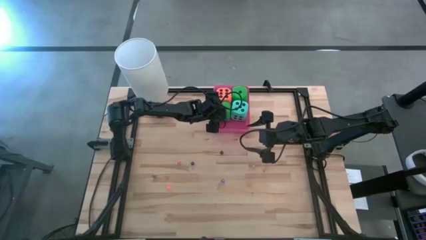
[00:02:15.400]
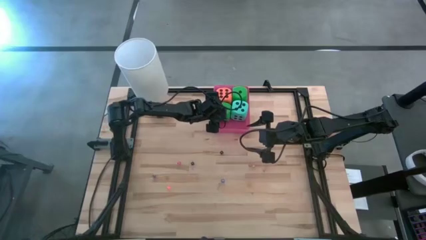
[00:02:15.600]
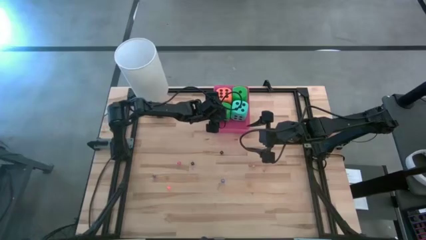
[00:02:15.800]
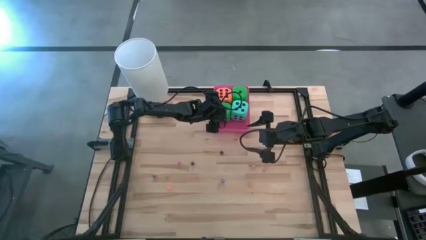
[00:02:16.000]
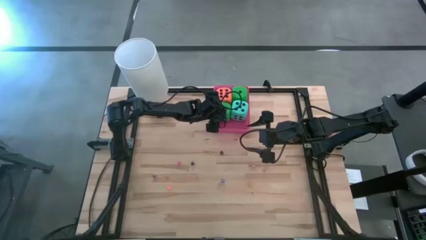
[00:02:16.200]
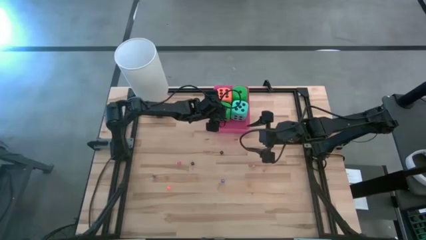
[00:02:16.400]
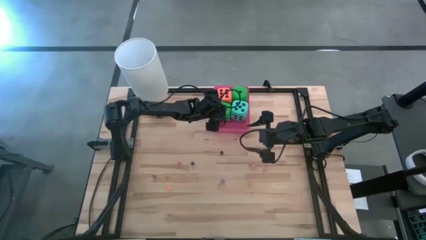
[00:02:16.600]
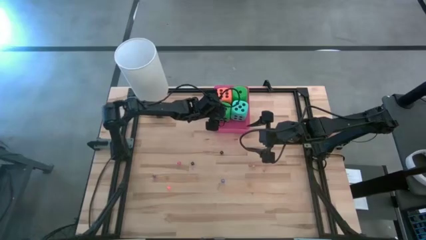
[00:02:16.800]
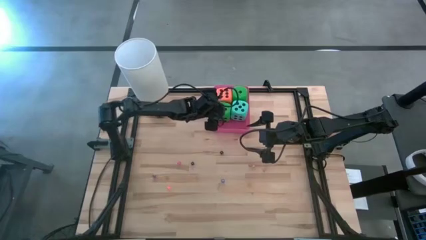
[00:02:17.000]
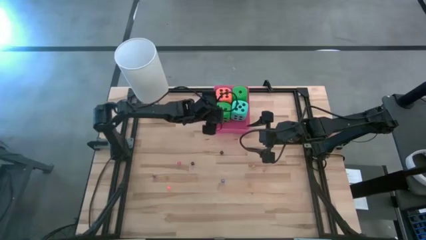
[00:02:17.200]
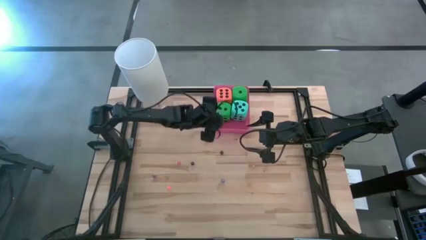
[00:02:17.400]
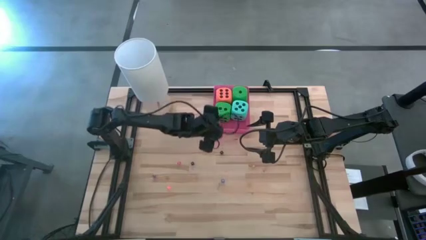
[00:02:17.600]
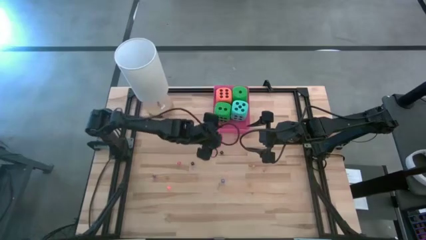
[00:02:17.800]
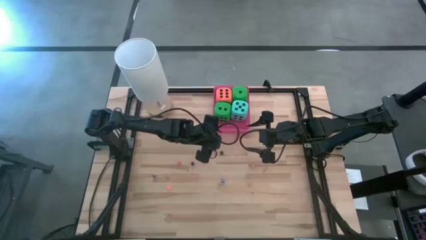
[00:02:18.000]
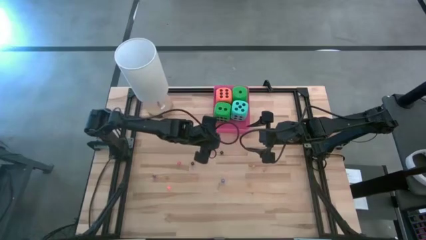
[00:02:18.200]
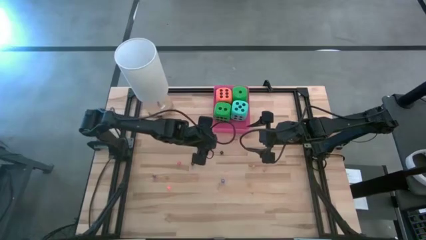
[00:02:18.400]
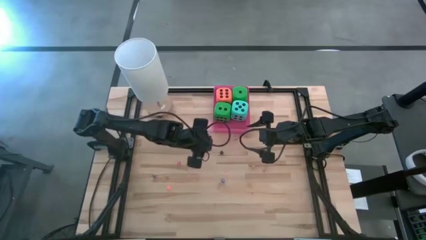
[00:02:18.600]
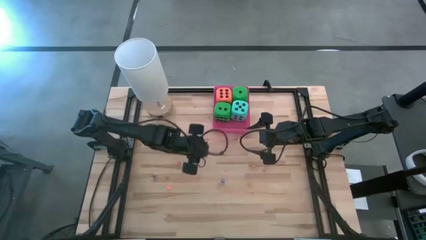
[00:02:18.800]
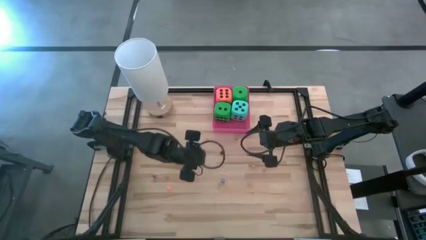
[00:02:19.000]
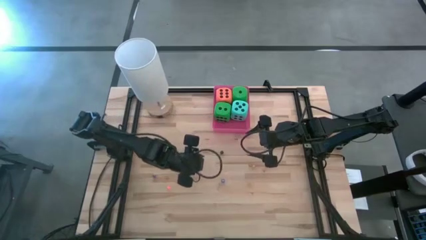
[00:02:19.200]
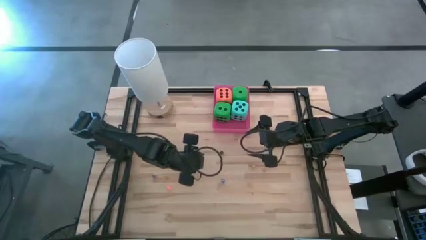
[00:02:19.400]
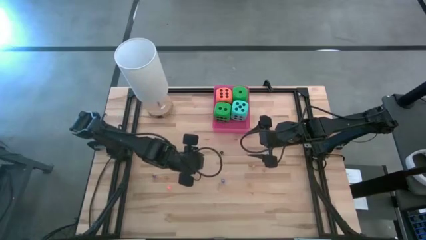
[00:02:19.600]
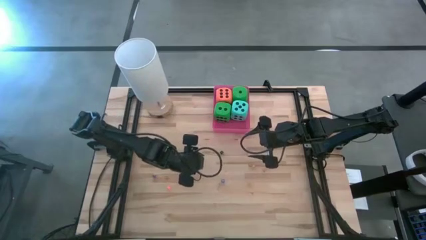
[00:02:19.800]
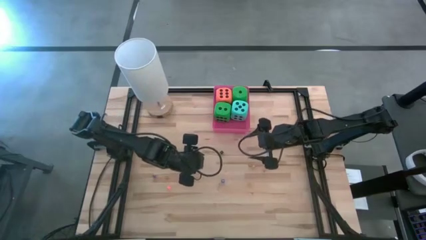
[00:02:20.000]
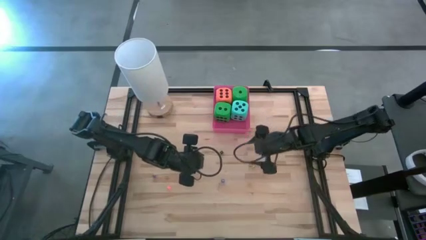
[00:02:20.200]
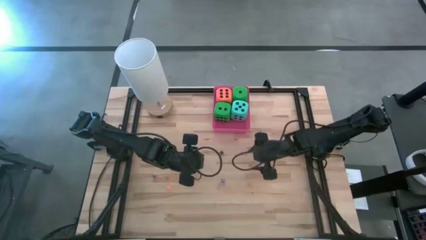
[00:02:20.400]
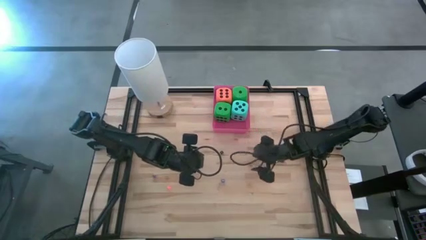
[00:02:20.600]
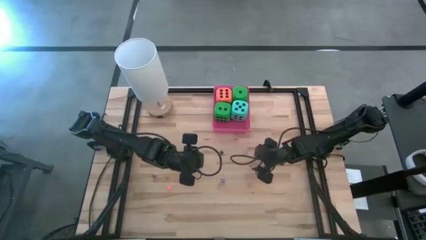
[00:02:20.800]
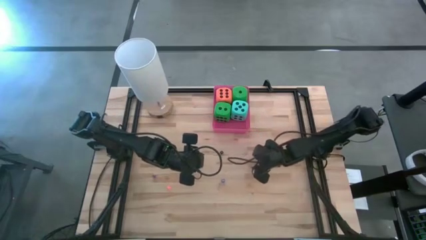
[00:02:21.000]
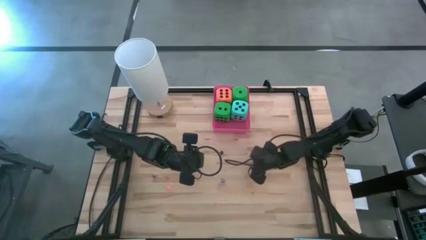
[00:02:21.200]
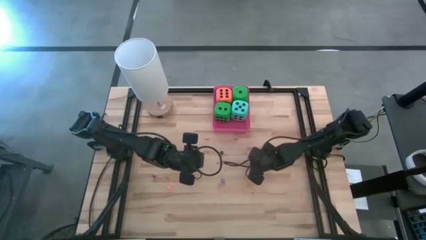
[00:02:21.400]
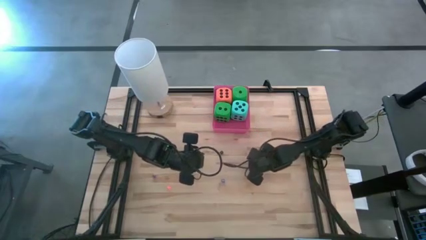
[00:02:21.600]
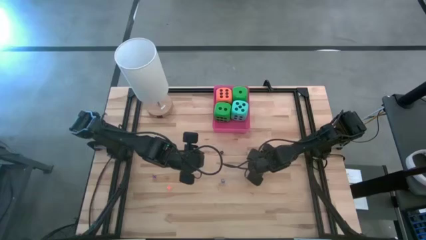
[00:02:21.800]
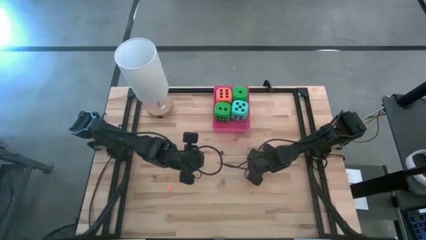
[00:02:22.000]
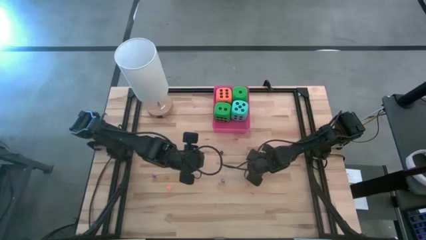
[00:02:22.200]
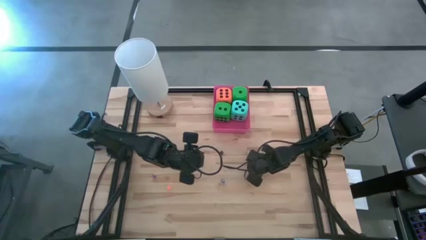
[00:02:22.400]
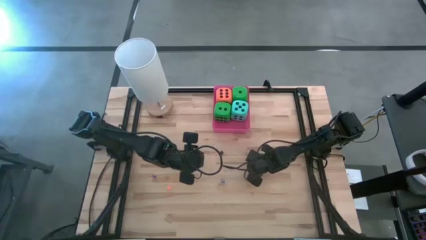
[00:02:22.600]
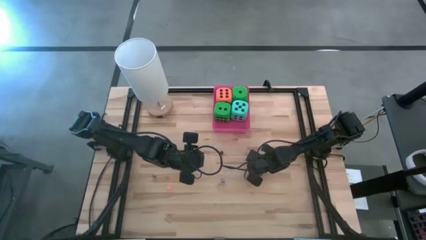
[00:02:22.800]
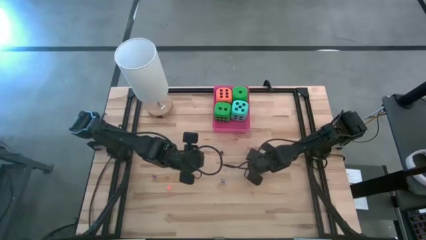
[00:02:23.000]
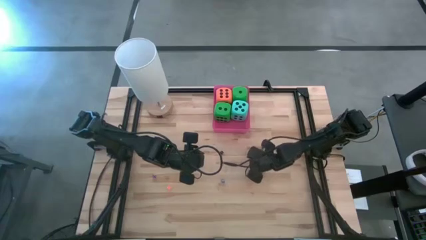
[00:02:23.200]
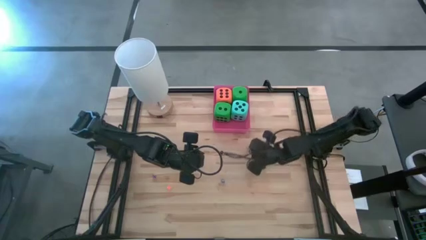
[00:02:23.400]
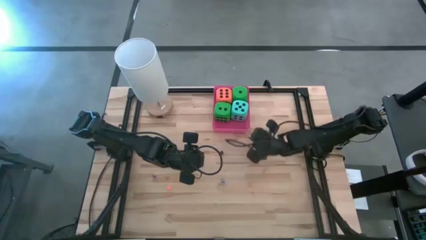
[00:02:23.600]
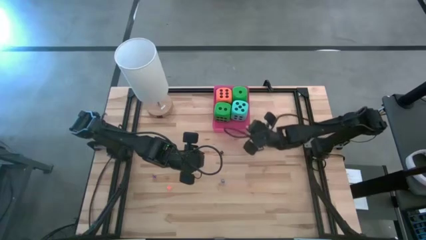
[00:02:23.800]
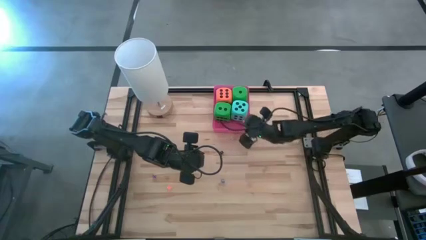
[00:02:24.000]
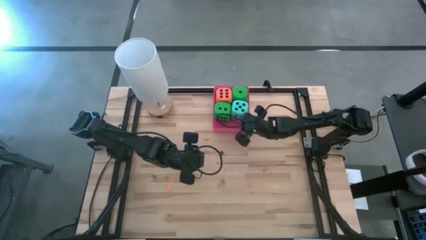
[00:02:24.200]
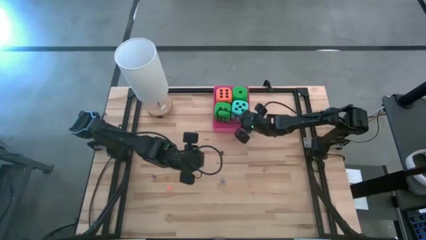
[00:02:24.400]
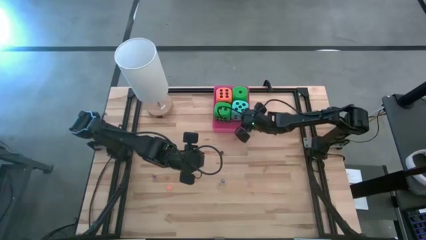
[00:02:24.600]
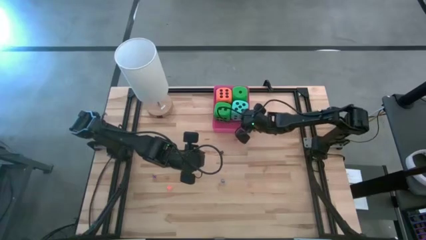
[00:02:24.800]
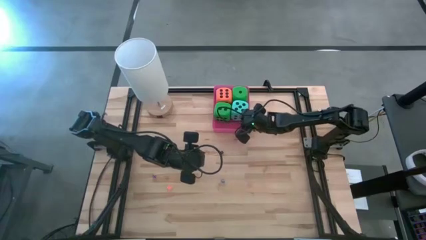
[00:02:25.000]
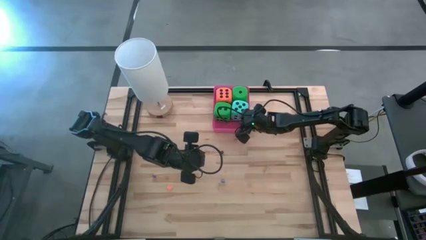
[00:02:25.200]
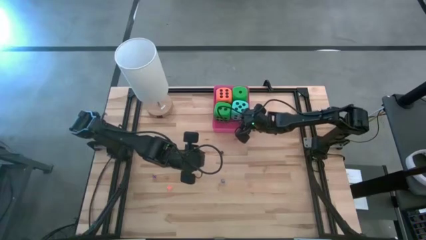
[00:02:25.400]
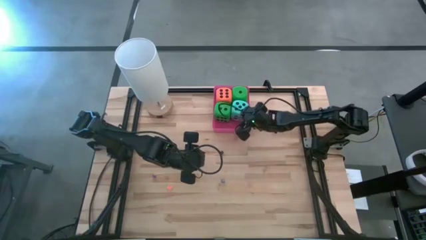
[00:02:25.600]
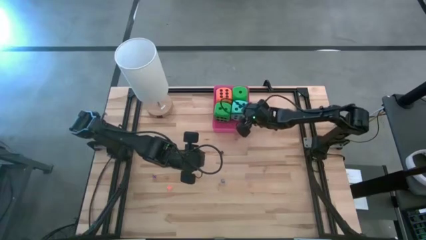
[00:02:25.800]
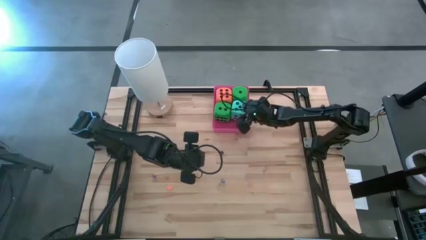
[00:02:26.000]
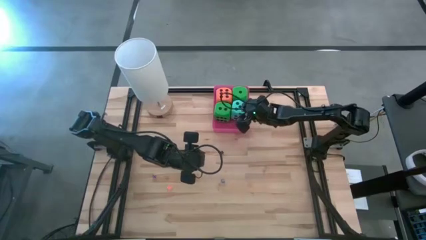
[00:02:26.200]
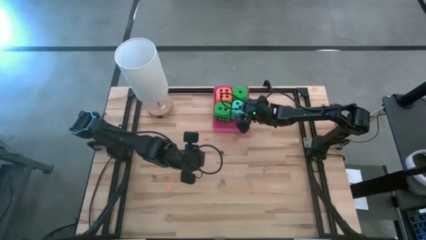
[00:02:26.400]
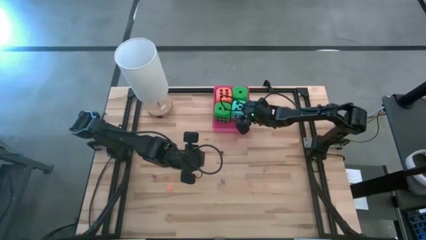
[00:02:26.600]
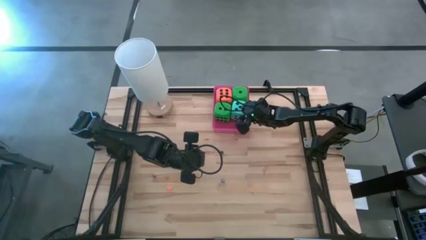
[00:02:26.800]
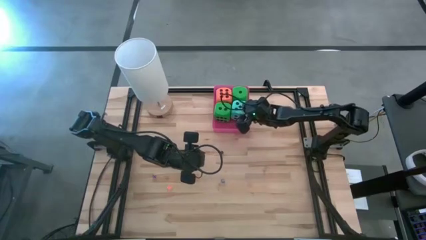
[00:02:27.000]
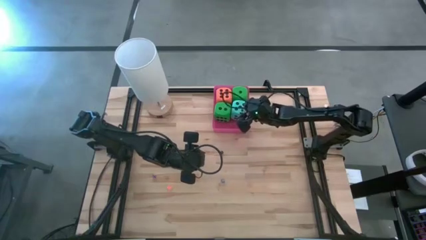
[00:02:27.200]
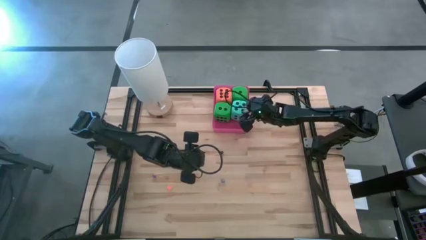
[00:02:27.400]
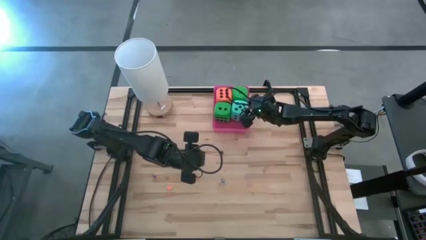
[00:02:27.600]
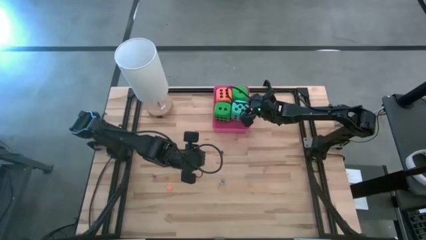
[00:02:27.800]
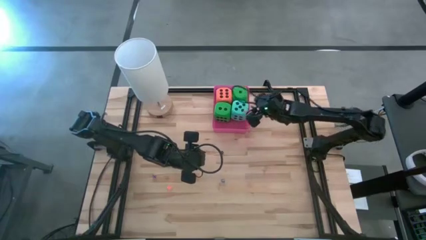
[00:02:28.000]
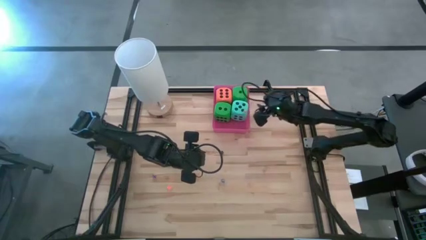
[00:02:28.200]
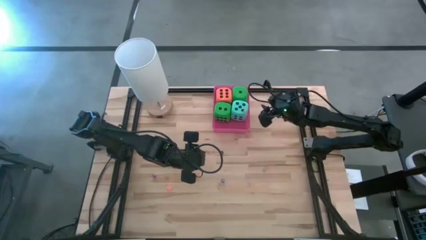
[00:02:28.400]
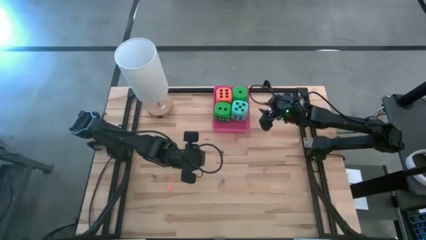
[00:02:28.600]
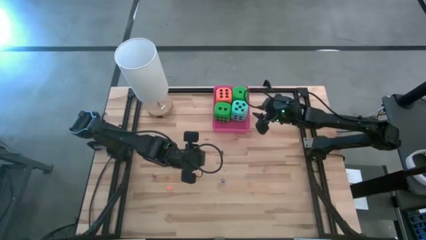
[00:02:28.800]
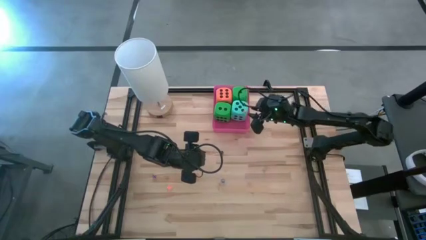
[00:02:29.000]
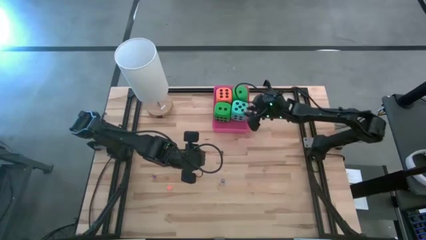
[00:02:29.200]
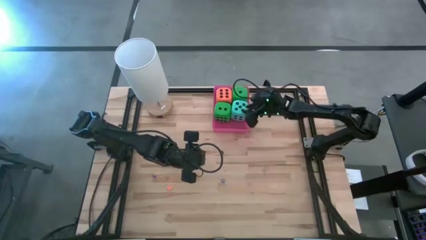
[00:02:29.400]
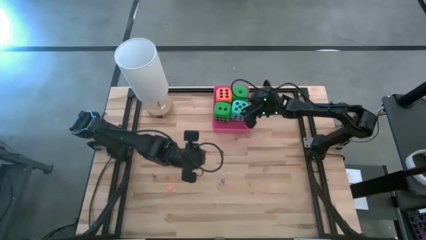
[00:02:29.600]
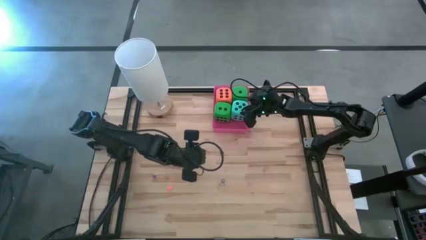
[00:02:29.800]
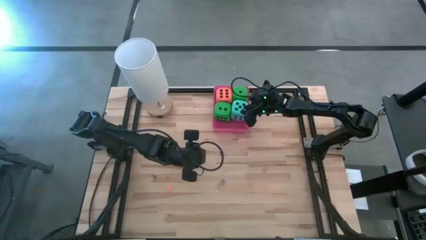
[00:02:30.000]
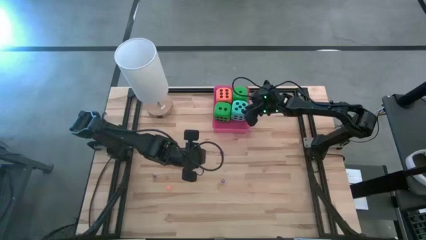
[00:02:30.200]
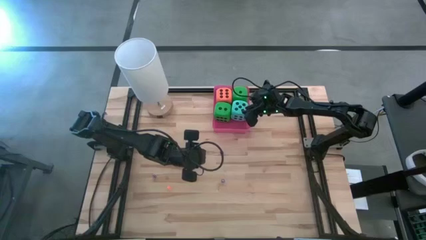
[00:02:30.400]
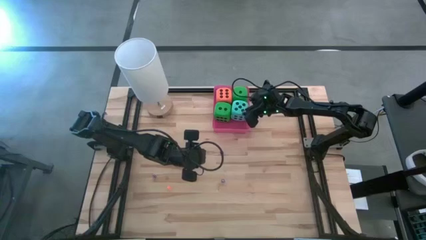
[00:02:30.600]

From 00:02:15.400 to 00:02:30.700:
Task: Pick & Place Dice
Put the small yellow dice into the red container
